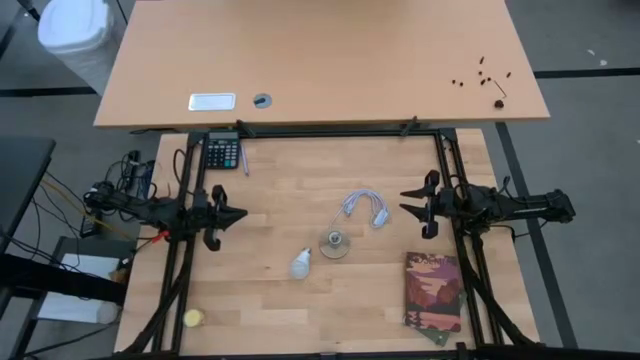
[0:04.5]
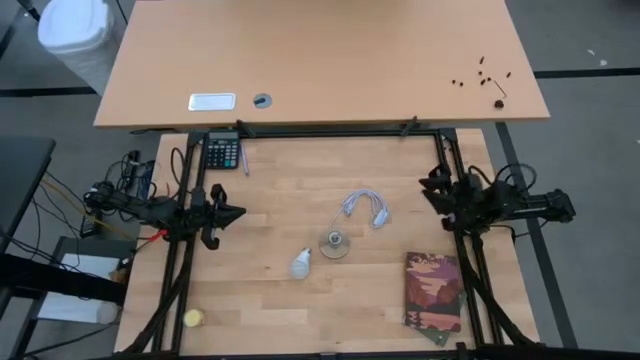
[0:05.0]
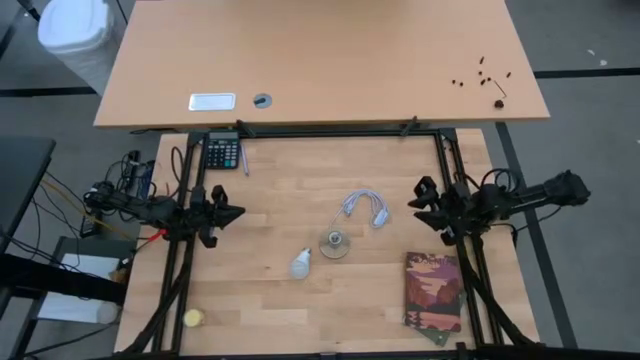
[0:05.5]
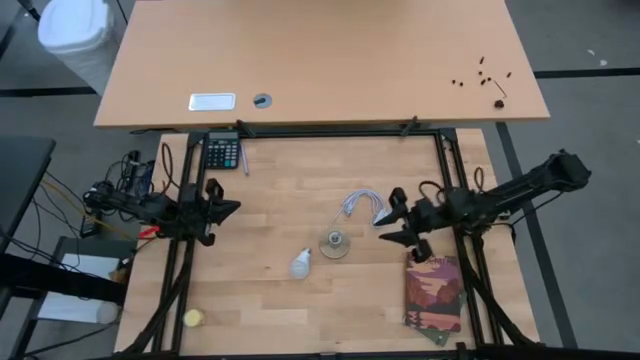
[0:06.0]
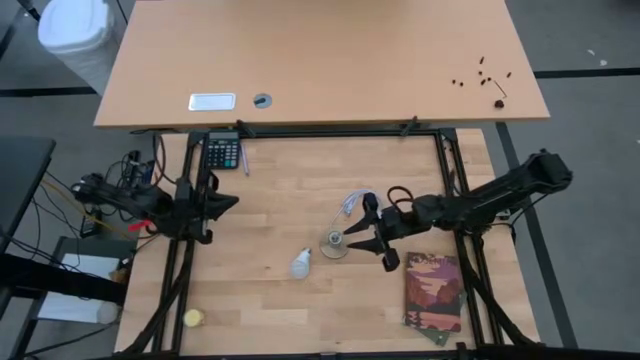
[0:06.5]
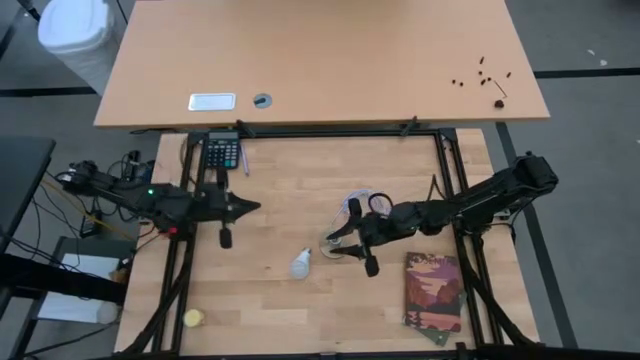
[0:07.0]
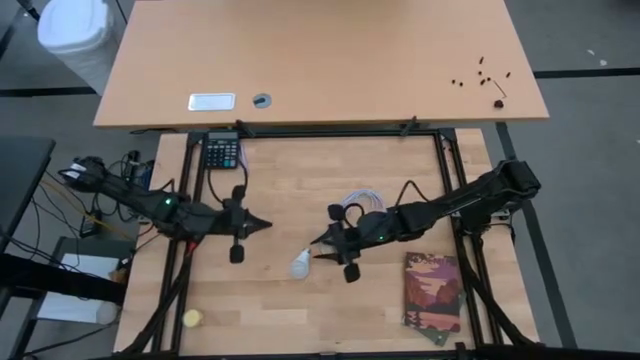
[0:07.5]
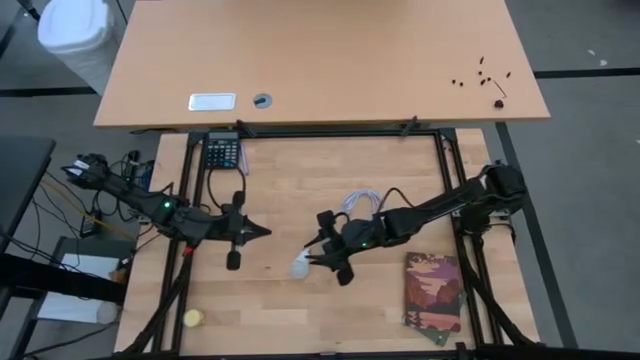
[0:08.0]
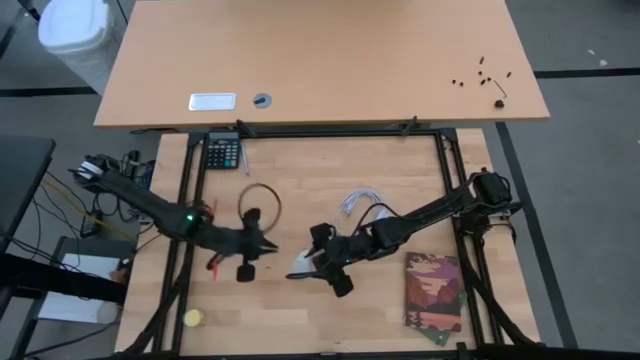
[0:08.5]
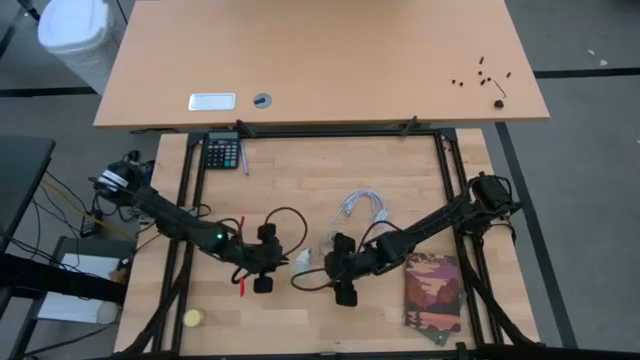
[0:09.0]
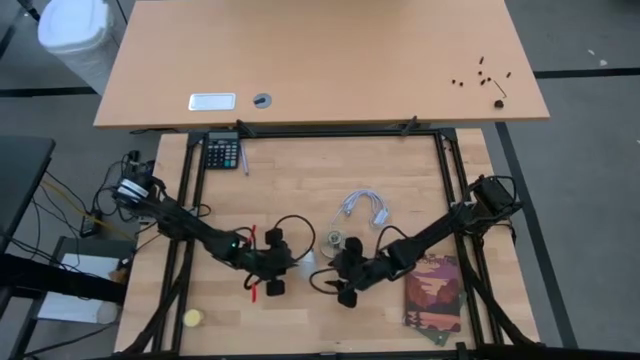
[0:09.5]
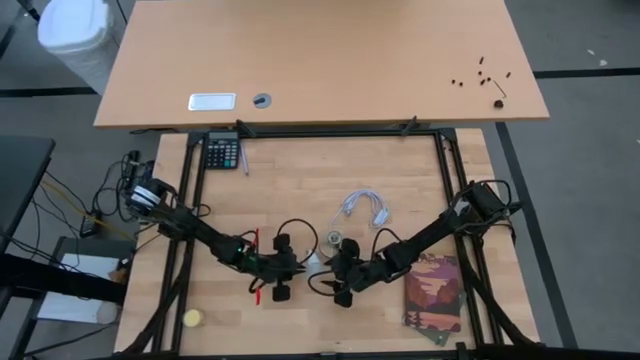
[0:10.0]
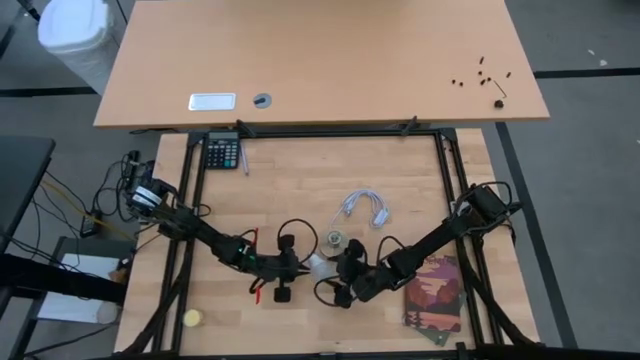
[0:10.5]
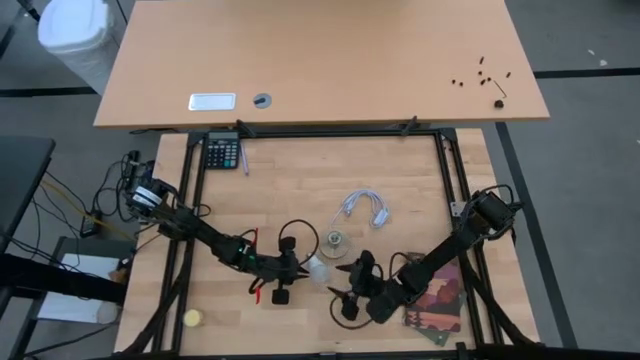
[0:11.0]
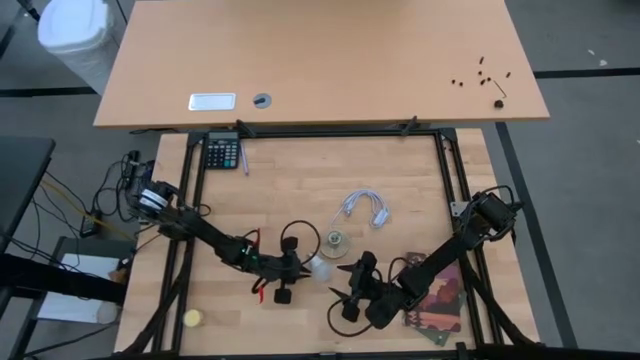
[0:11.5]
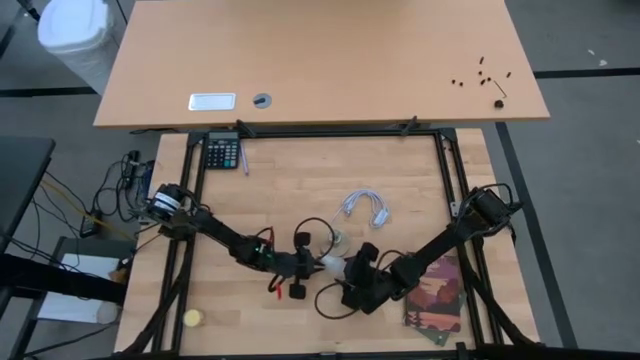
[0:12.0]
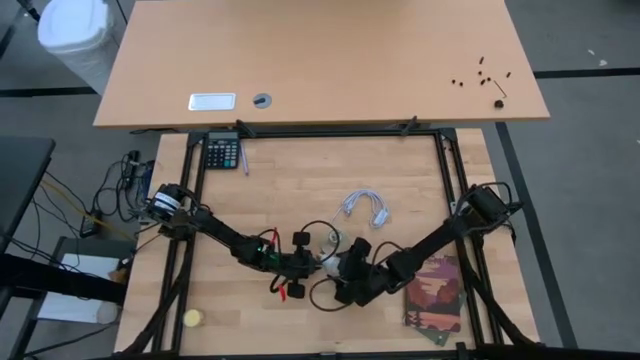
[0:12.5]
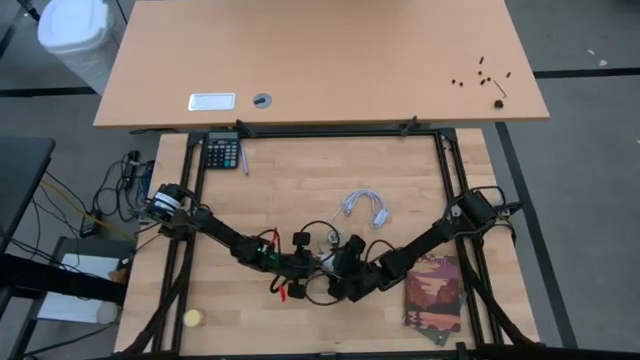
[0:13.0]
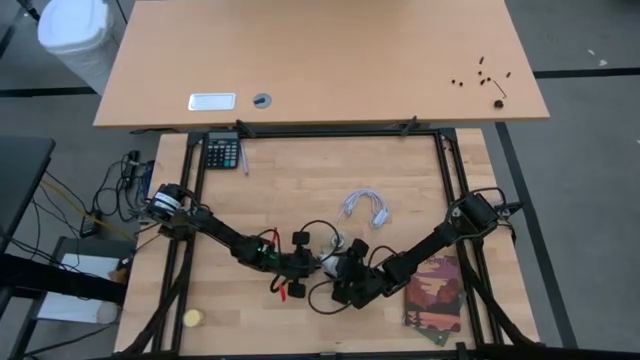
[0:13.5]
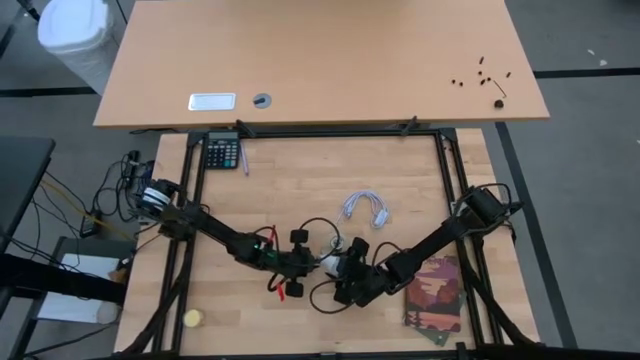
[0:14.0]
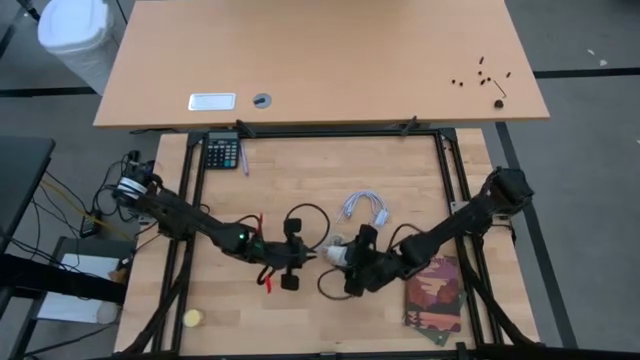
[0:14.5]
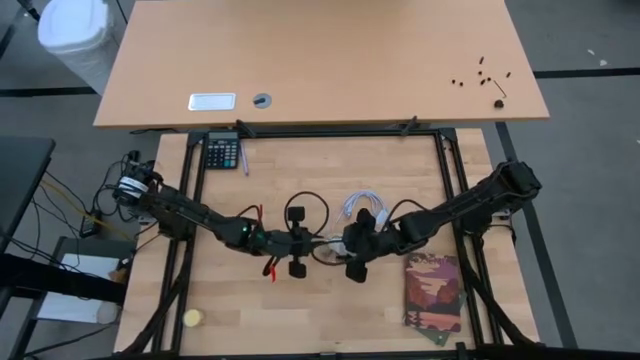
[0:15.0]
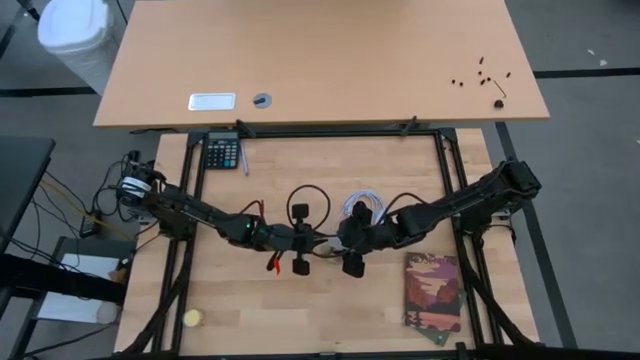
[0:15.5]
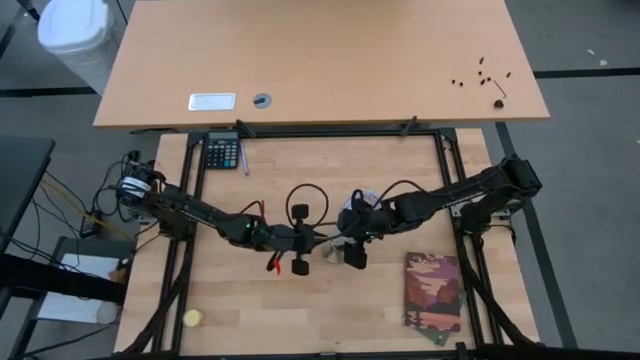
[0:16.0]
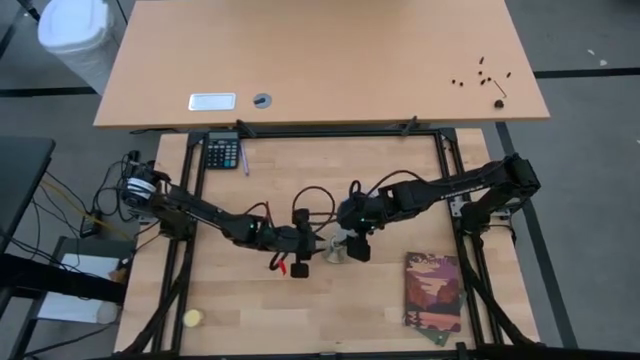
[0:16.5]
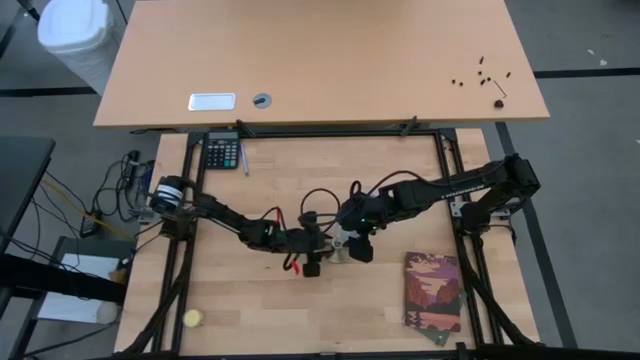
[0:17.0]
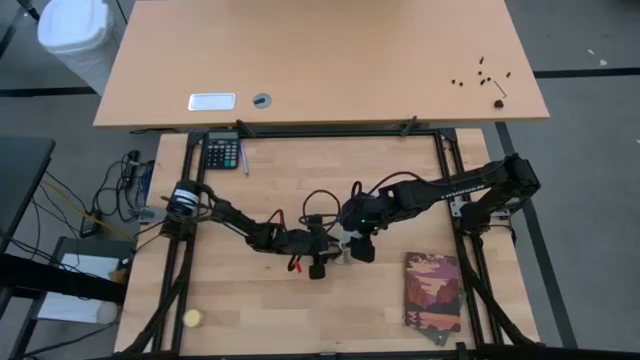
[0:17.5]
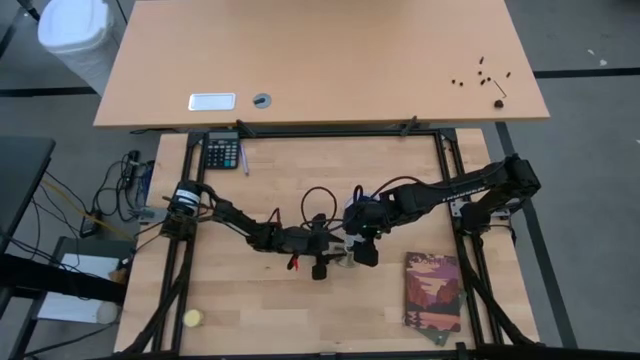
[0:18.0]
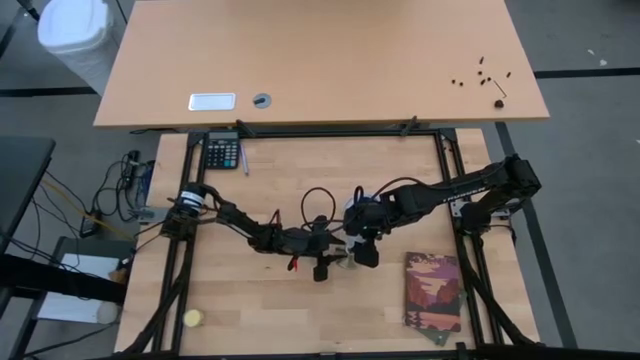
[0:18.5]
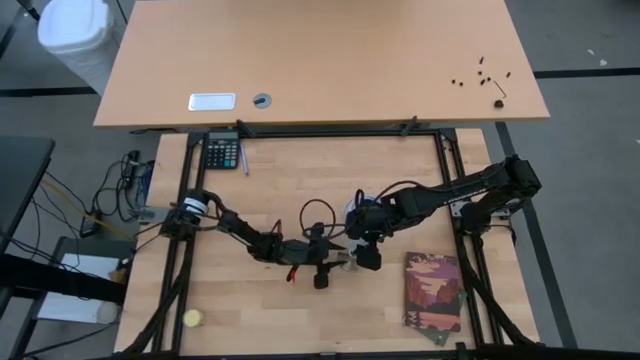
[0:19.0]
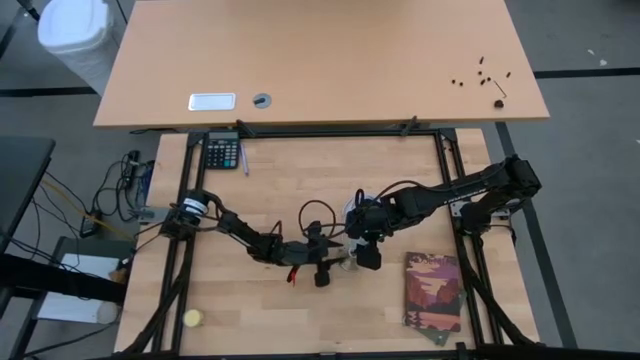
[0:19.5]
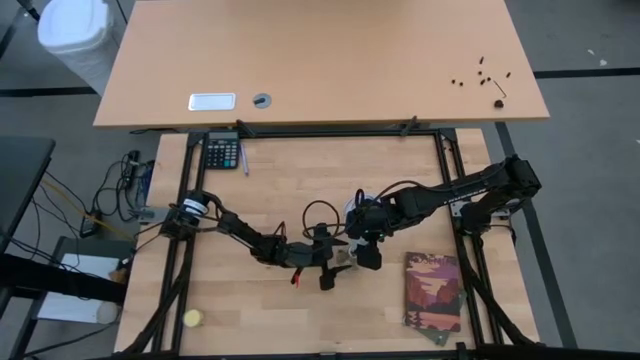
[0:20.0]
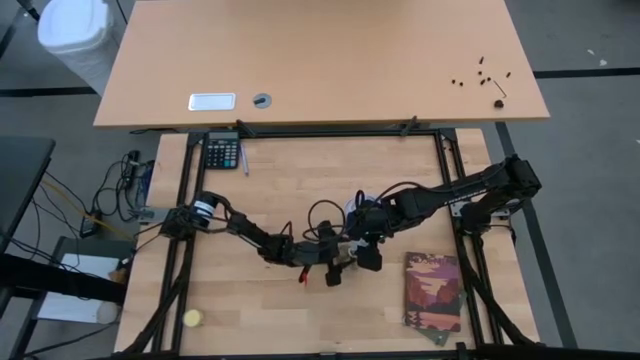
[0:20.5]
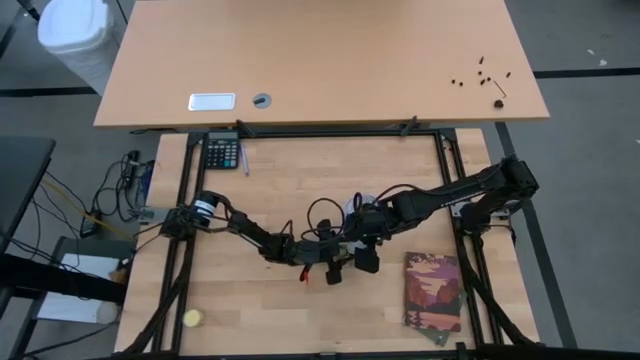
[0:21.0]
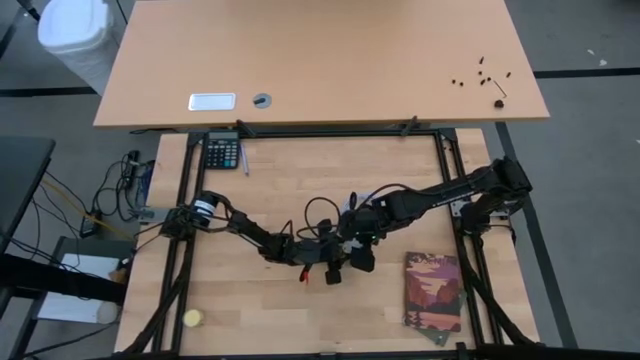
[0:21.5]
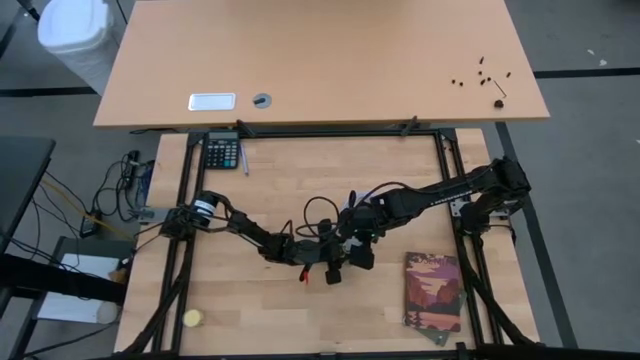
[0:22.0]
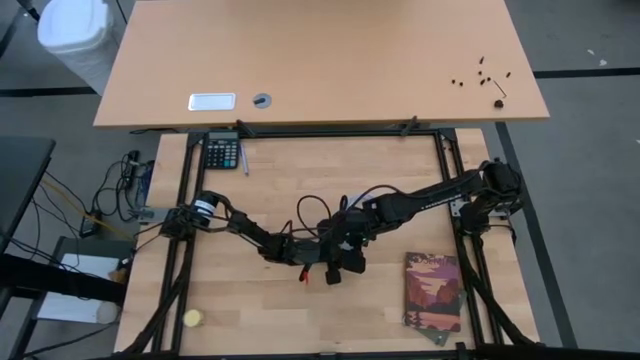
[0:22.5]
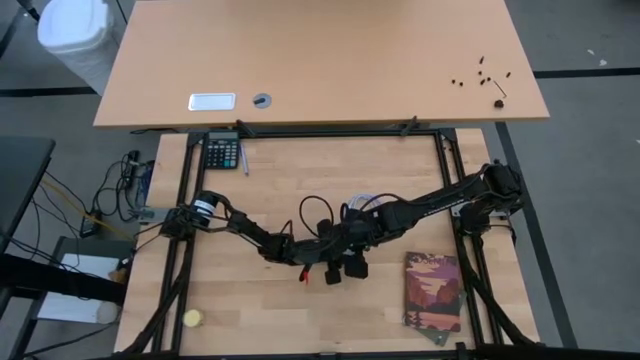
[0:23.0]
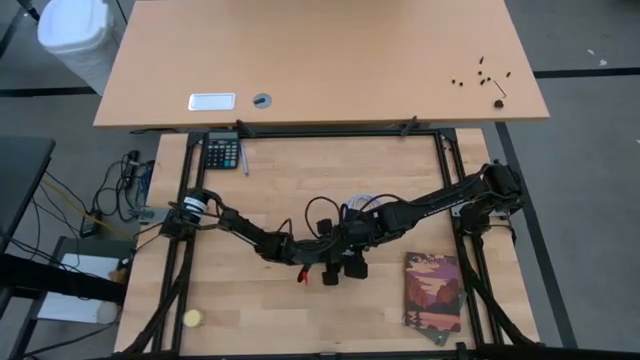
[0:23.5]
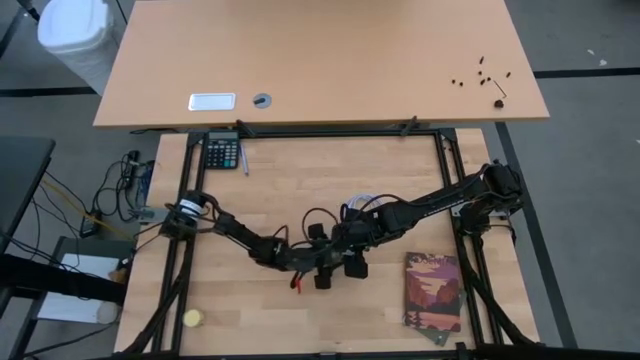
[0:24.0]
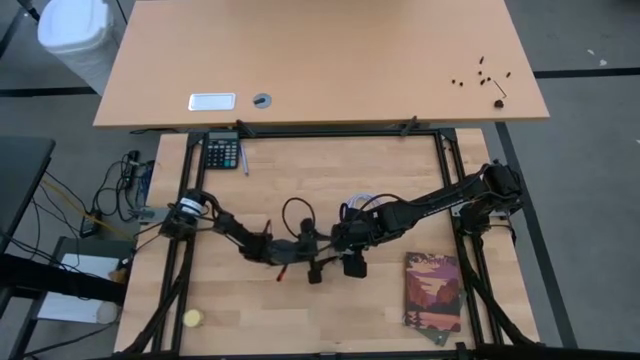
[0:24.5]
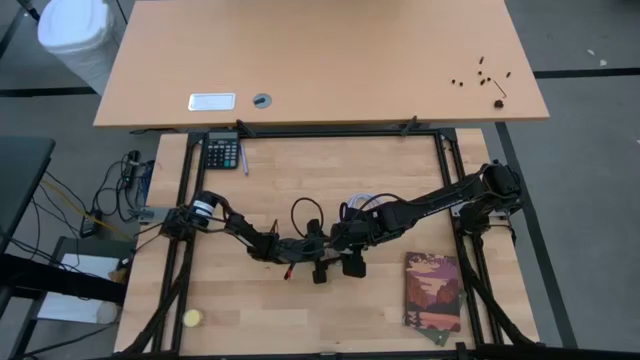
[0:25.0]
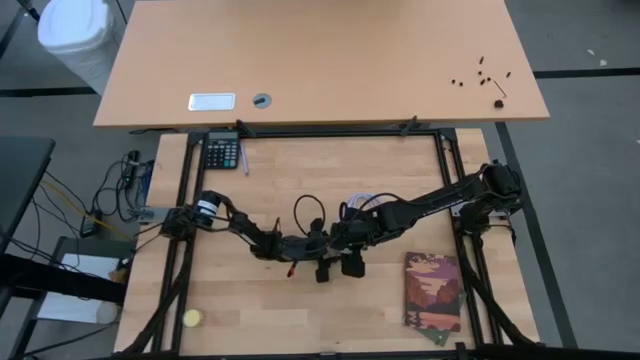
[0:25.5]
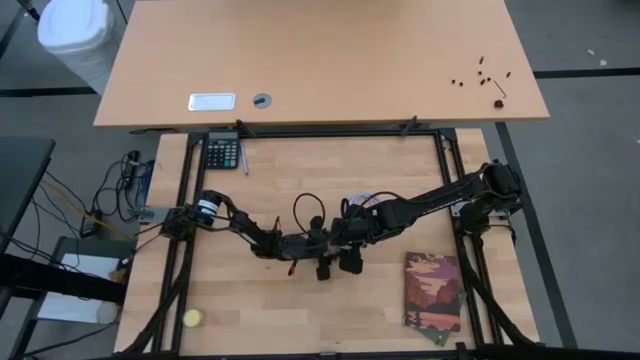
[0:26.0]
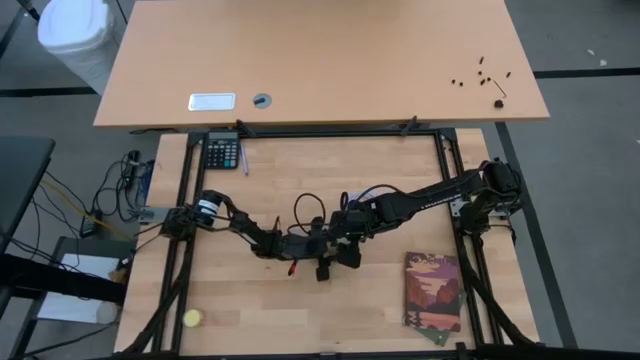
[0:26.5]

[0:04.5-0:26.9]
Task: Screw lightbulb
Insert the lightbulb into the lamp socket
